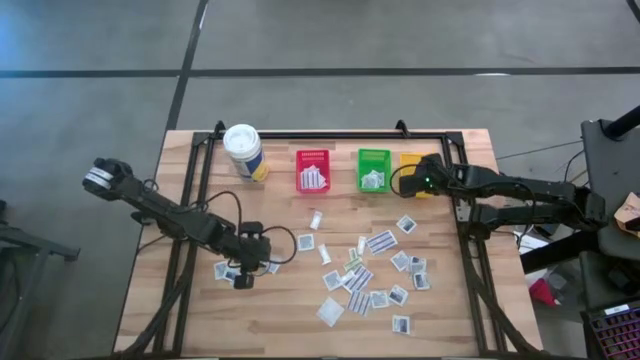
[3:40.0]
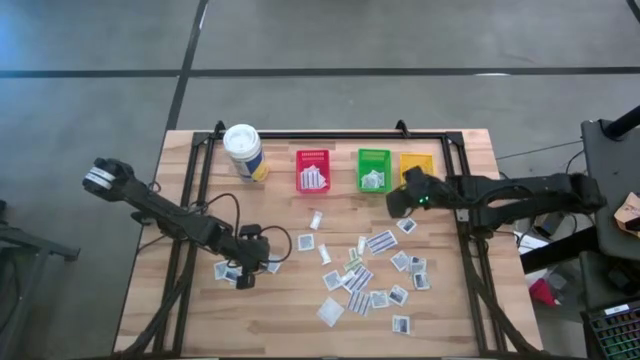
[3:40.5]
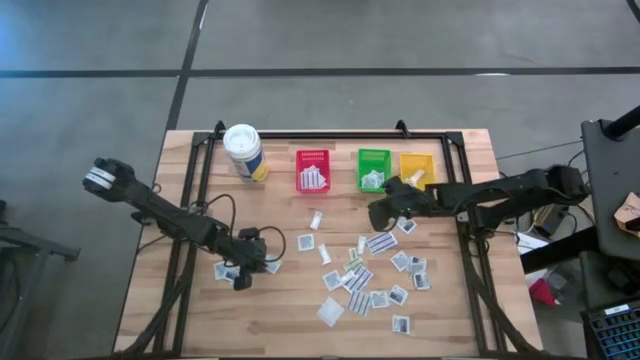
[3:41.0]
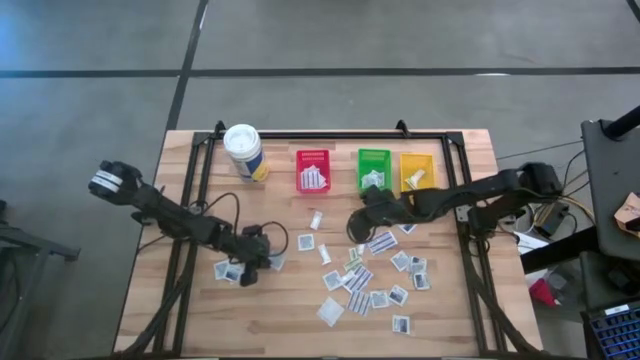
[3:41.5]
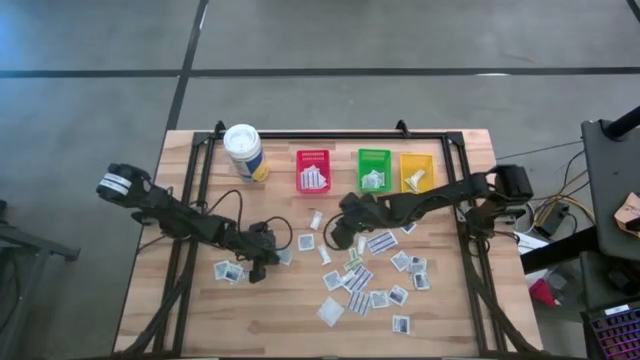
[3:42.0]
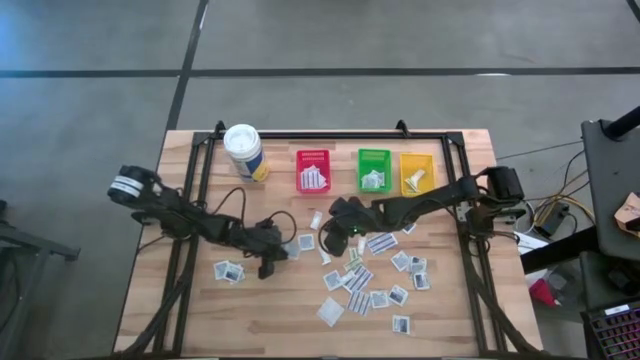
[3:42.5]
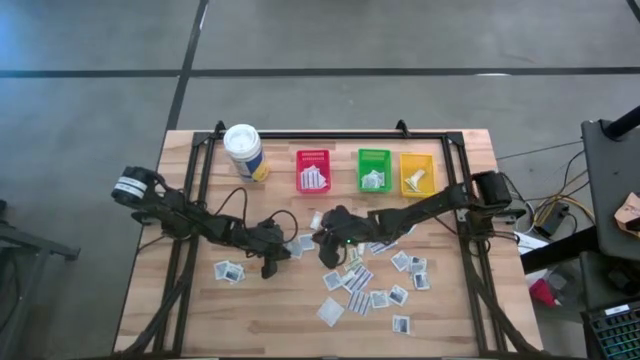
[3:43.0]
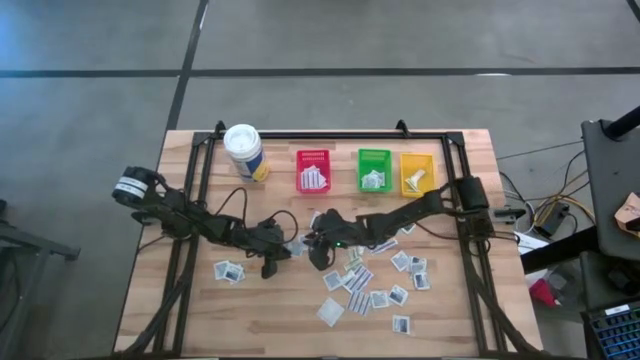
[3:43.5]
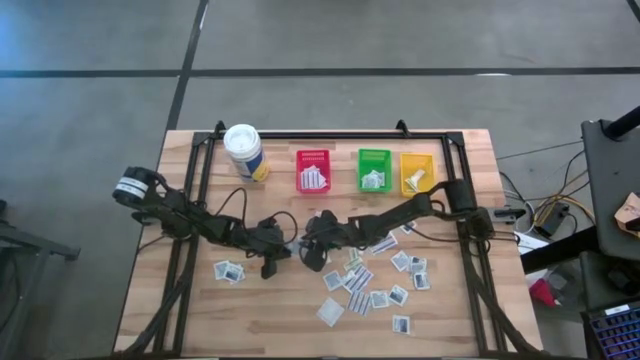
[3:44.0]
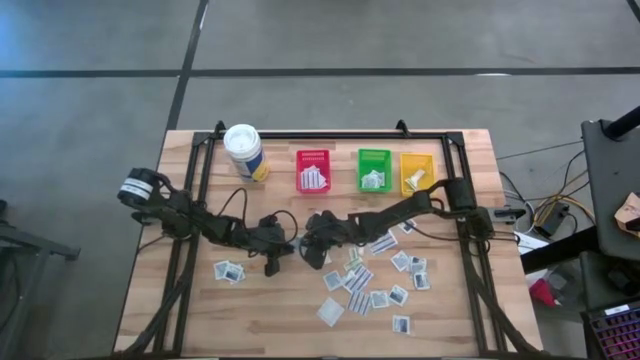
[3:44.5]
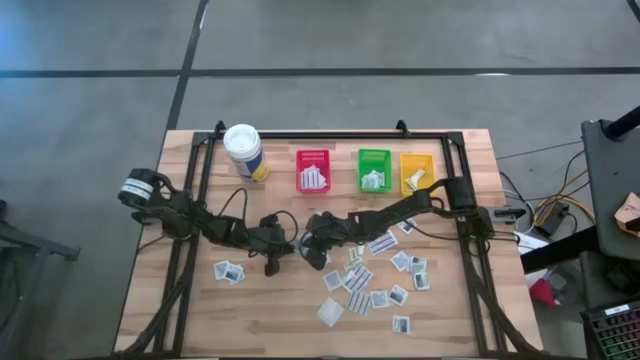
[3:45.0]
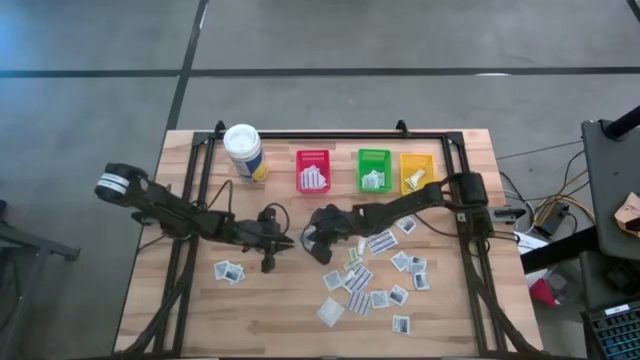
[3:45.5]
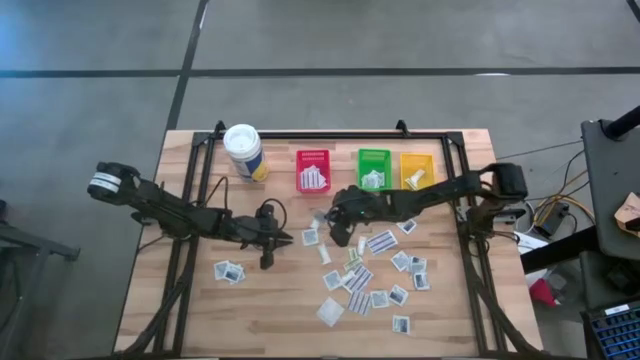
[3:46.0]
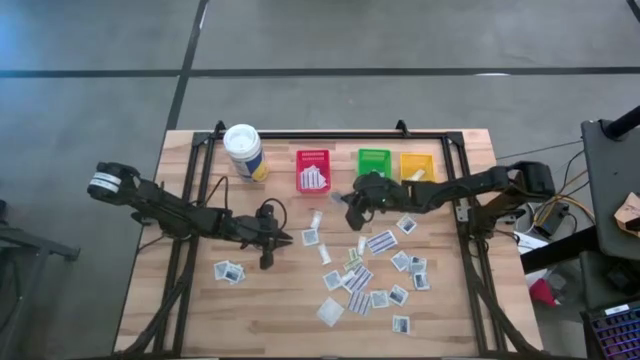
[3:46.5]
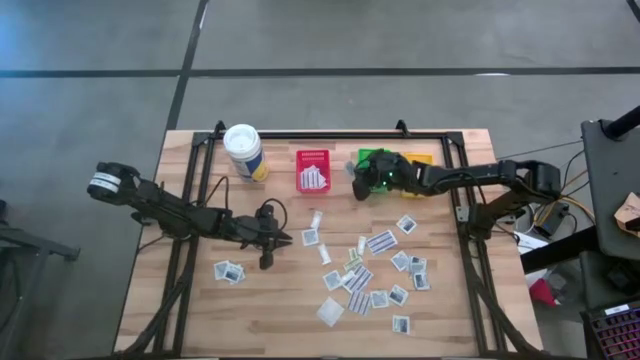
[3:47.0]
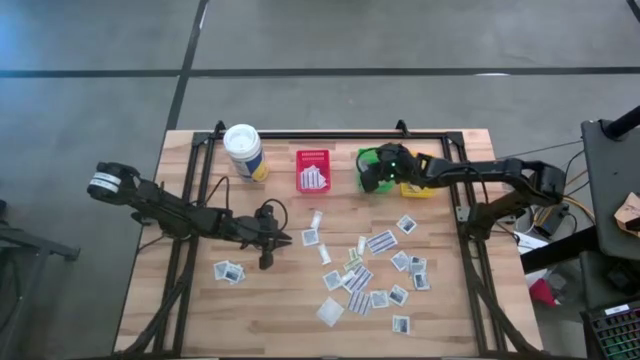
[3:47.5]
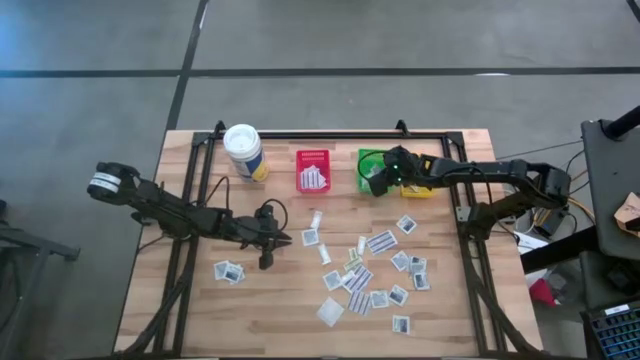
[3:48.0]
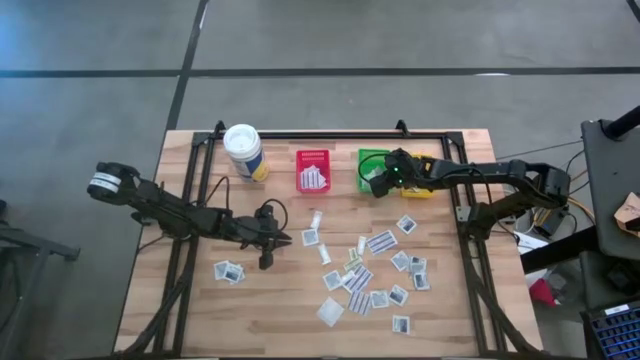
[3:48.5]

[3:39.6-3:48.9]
Task: Pick & Place First Aid Supplies
Put the alcohol pad in the green bin

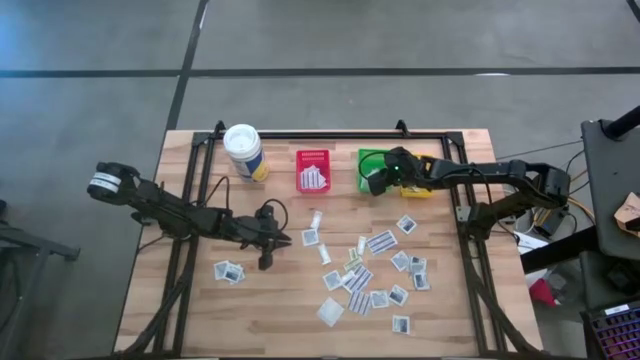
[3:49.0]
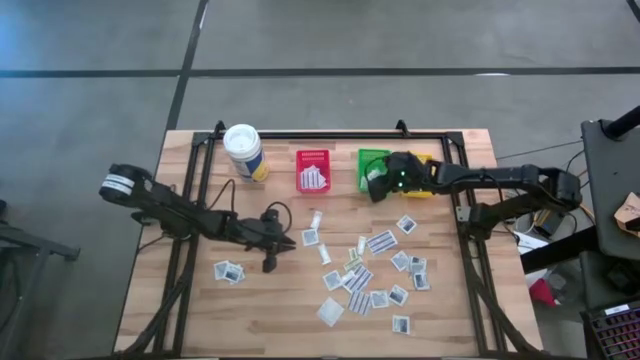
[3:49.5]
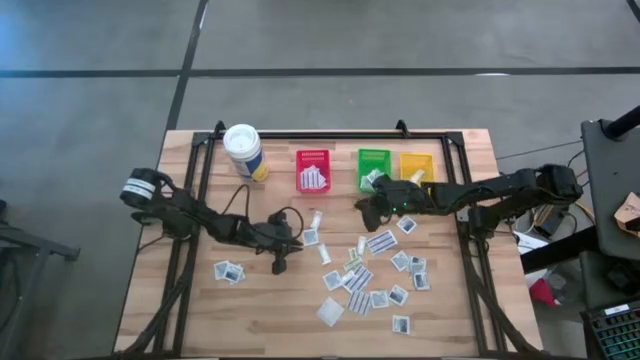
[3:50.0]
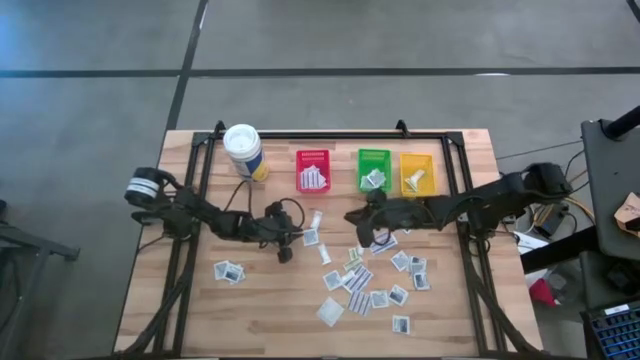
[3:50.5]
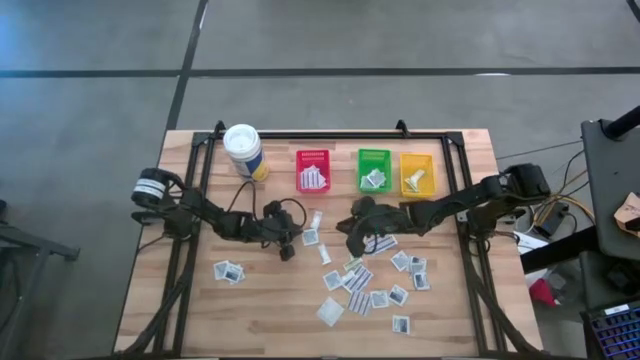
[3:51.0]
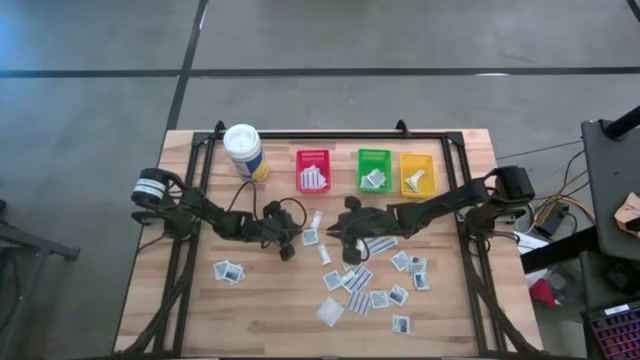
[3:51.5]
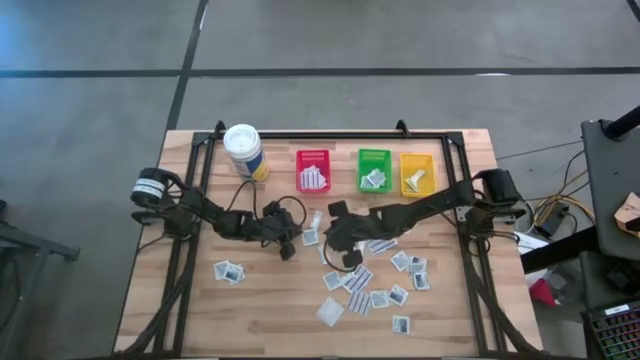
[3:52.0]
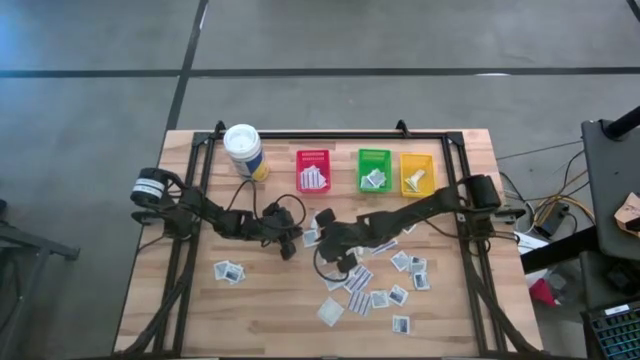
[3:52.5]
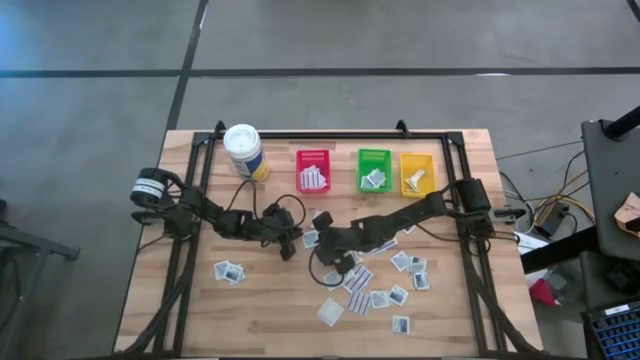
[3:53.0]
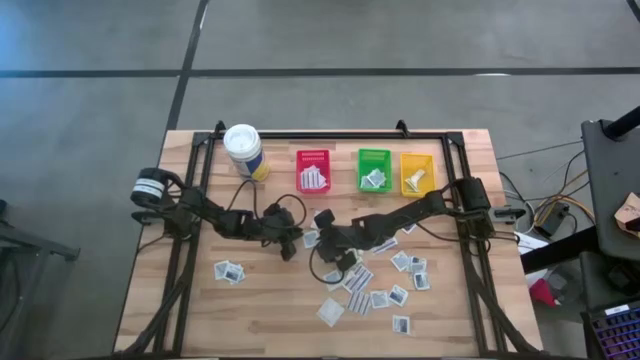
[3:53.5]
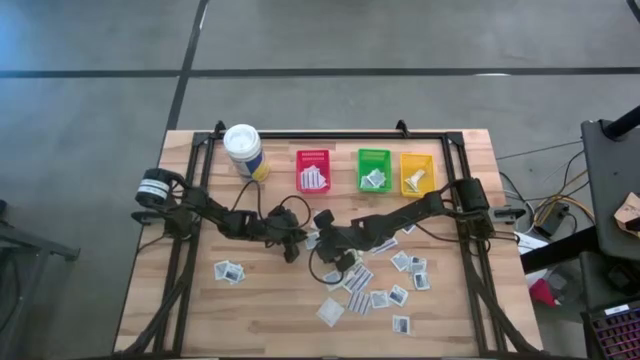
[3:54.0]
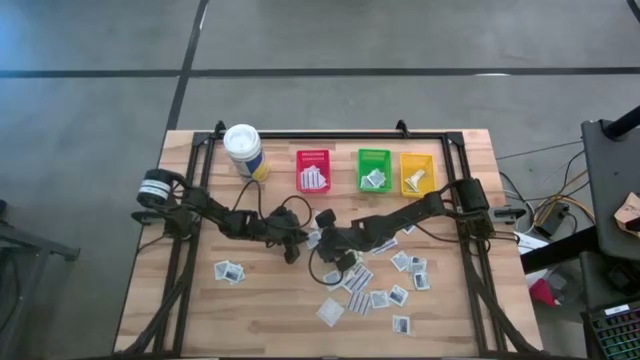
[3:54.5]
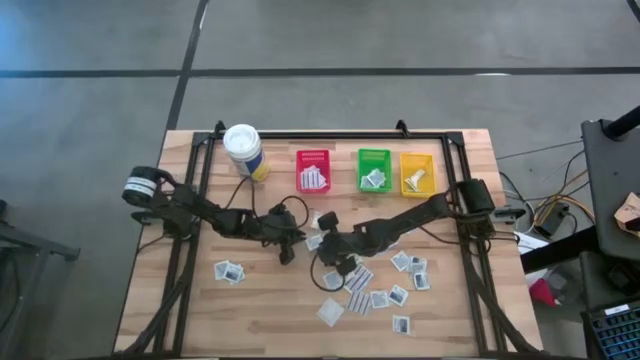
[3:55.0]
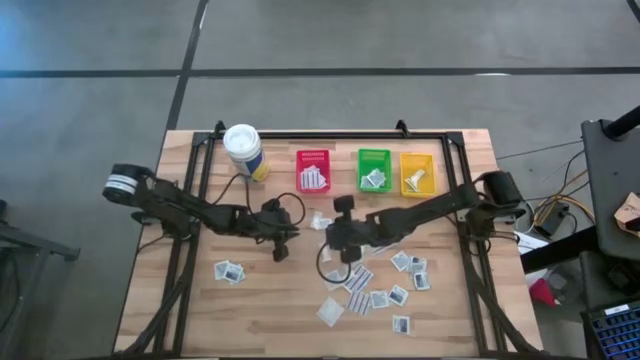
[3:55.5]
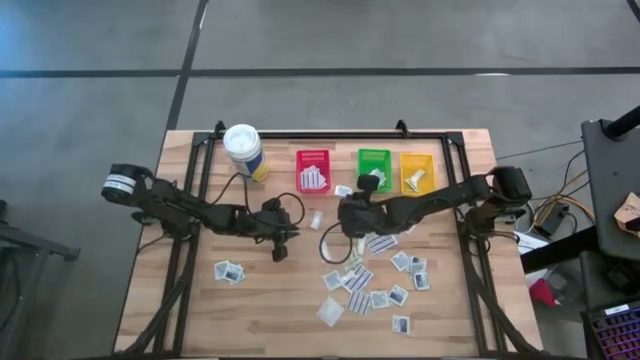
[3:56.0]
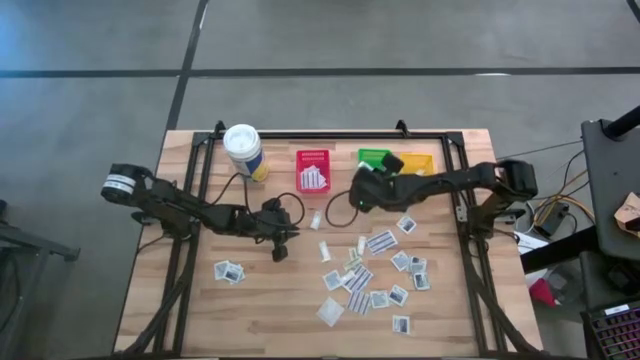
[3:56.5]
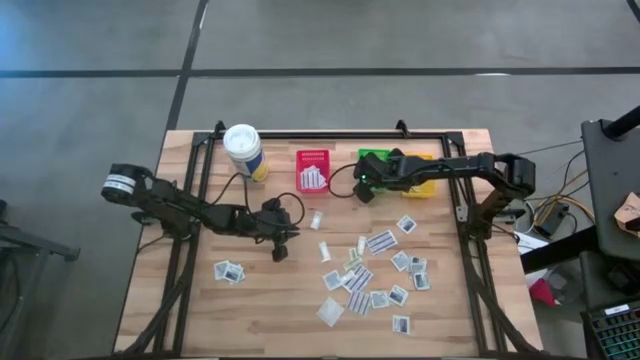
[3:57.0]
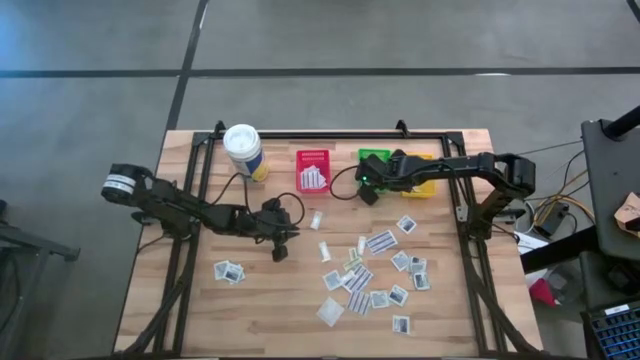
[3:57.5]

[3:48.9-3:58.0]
Put the alcohol pad in the green bin

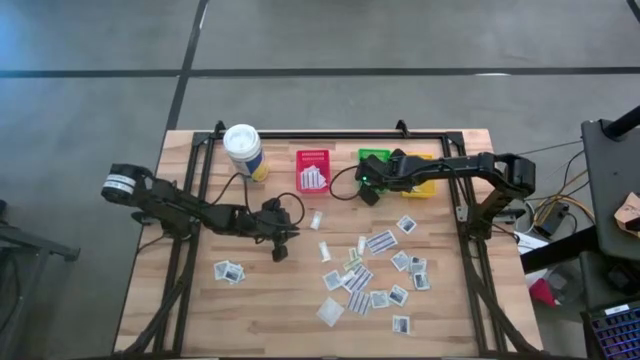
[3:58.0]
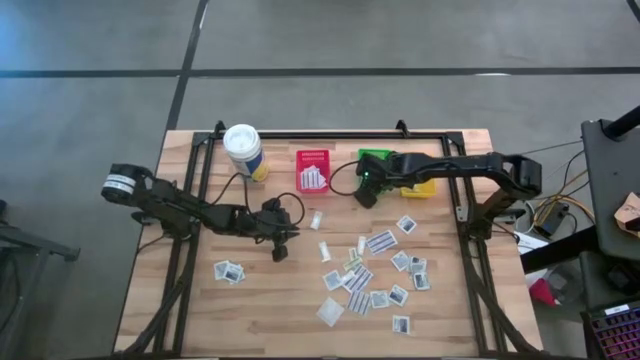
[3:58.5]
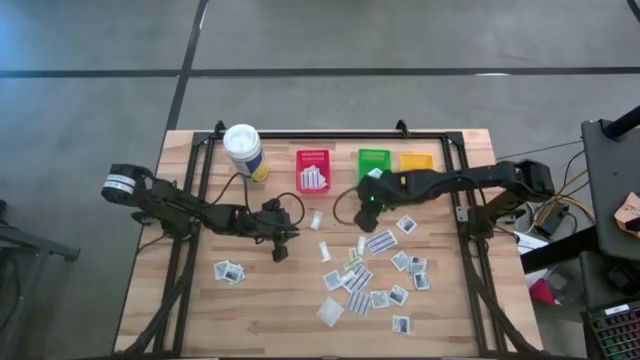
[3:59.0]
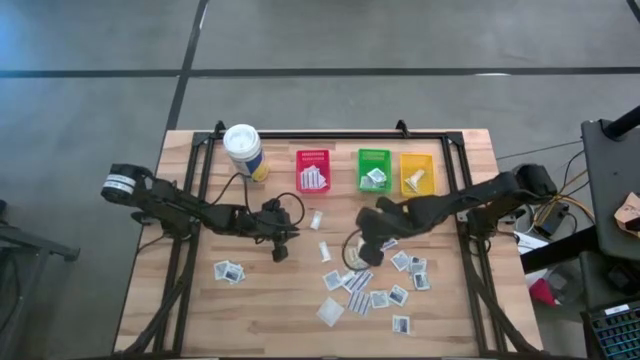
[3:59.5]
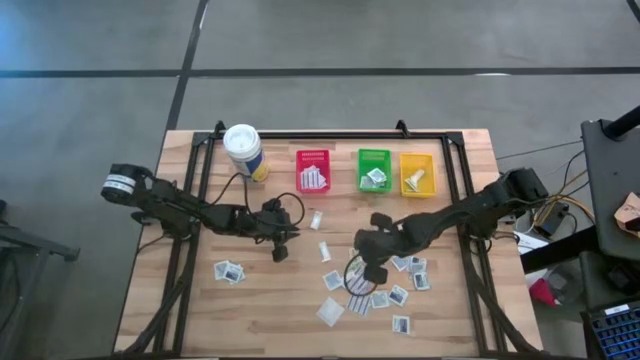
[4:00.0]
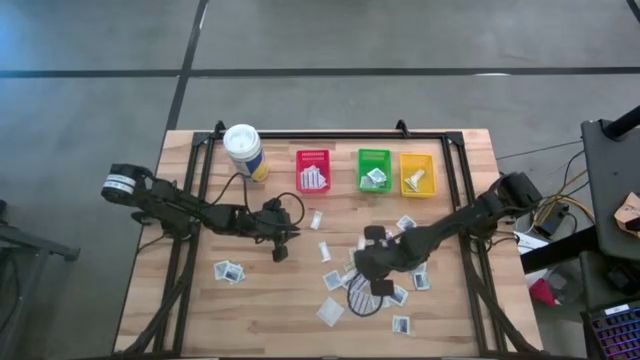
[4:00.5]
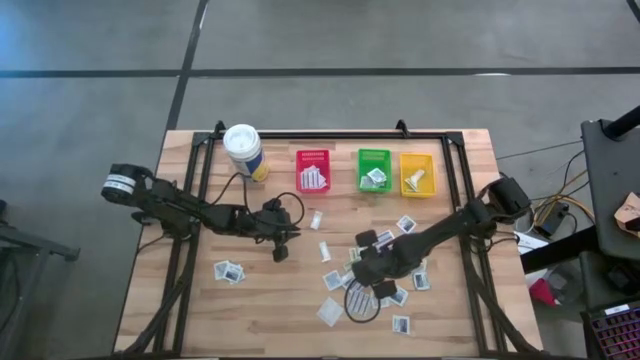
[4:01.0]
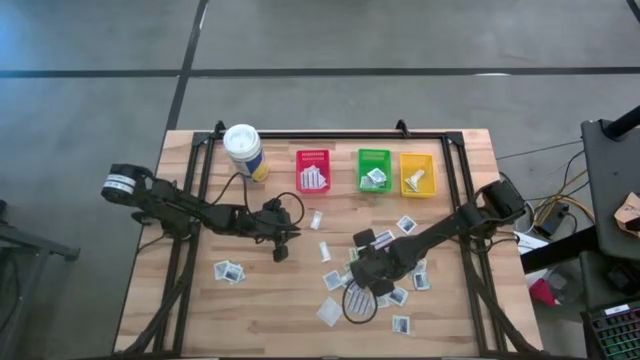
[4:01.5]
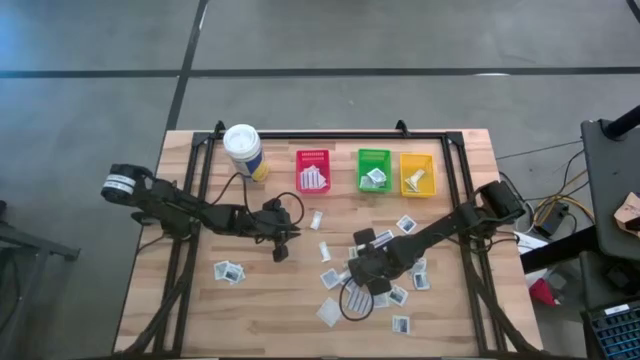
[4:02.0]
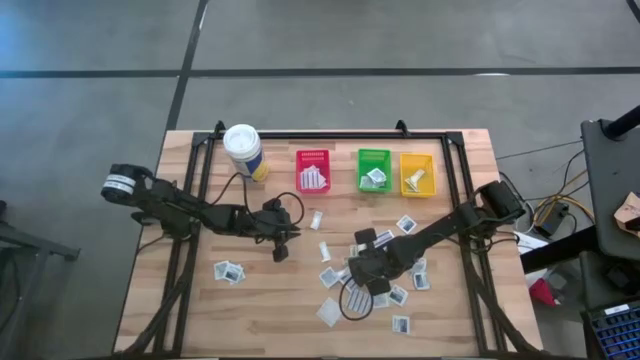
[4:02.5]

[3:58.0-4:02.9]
Put the green bandage in the yellow bin
